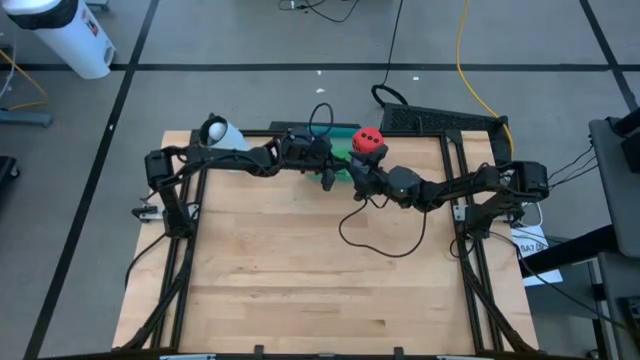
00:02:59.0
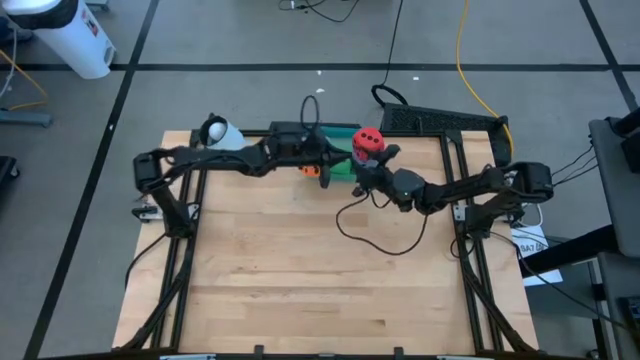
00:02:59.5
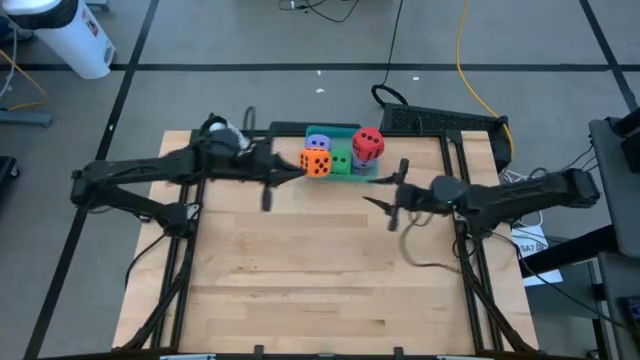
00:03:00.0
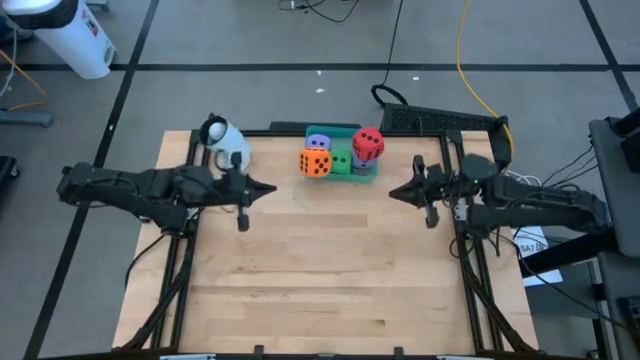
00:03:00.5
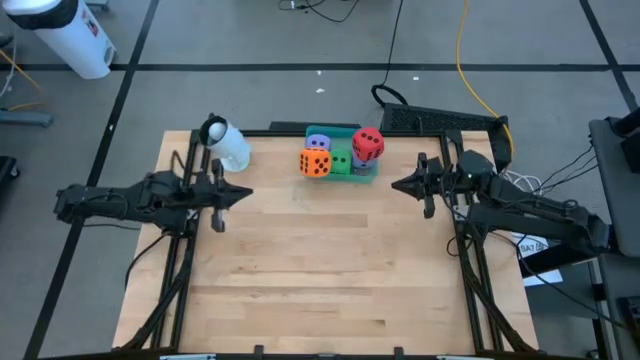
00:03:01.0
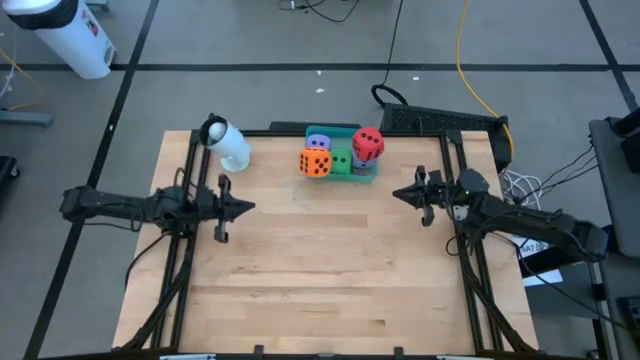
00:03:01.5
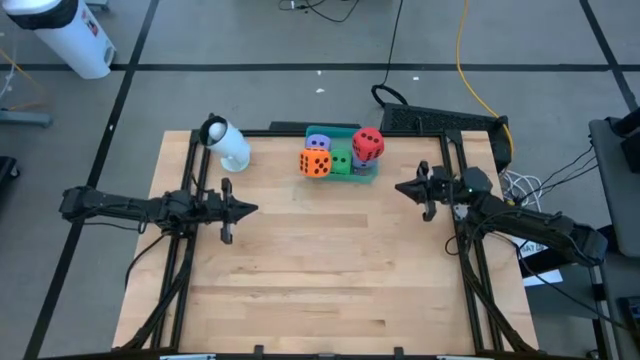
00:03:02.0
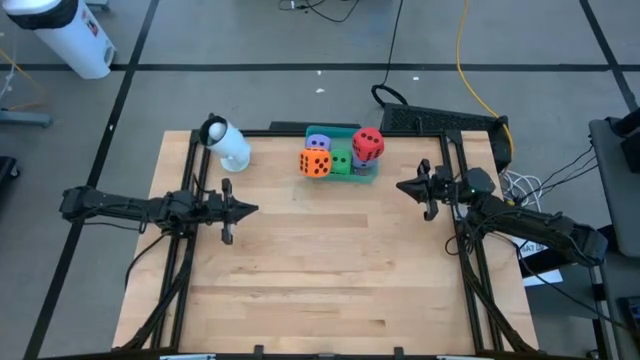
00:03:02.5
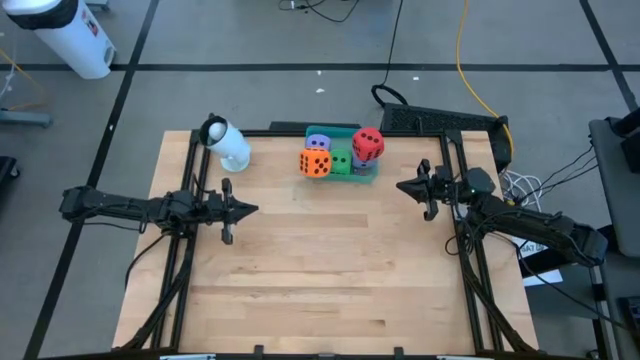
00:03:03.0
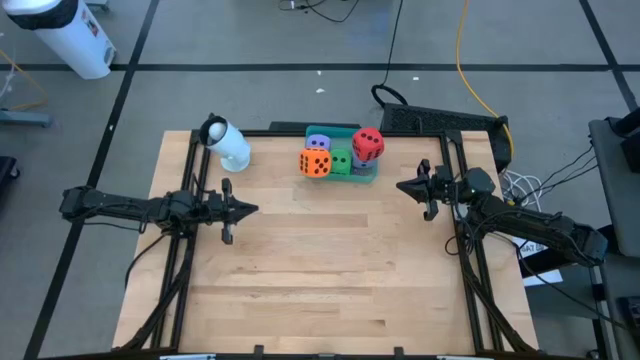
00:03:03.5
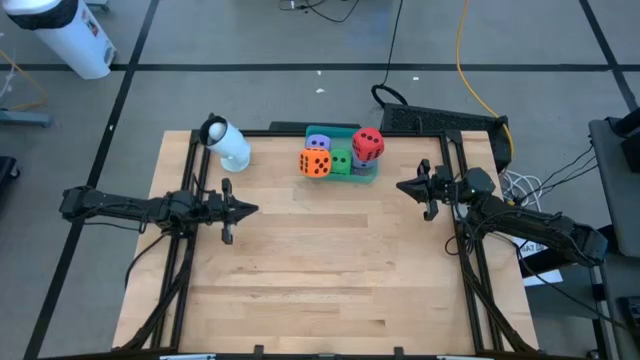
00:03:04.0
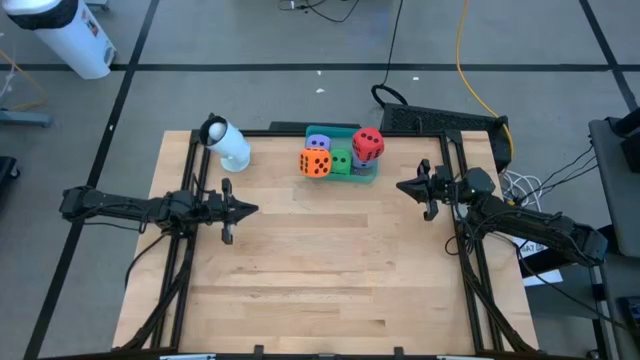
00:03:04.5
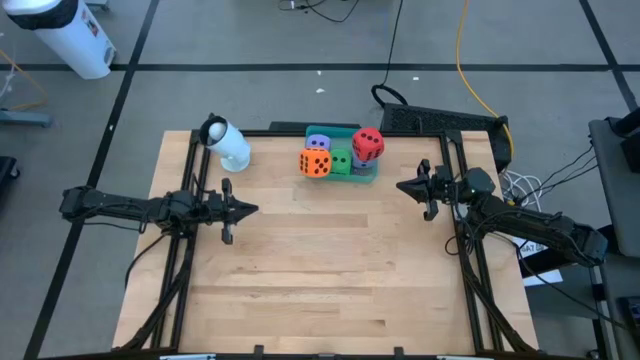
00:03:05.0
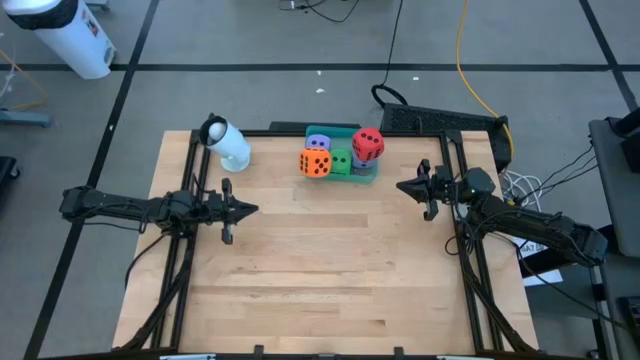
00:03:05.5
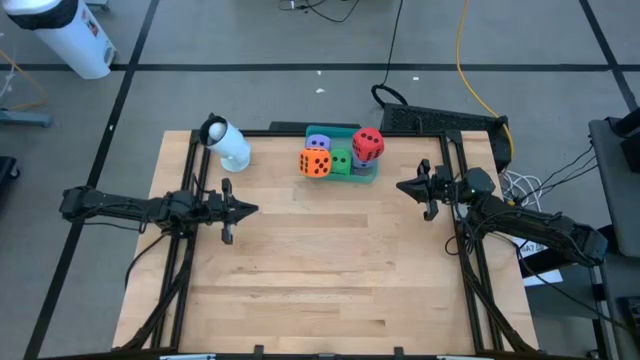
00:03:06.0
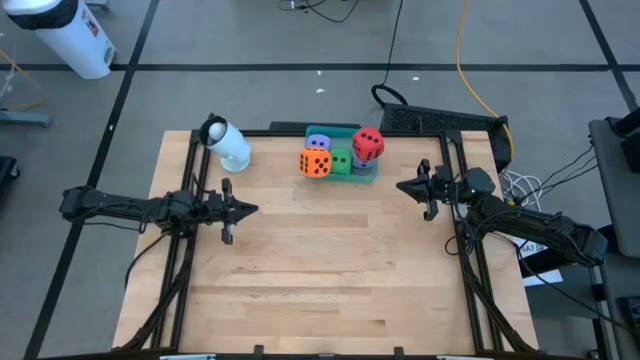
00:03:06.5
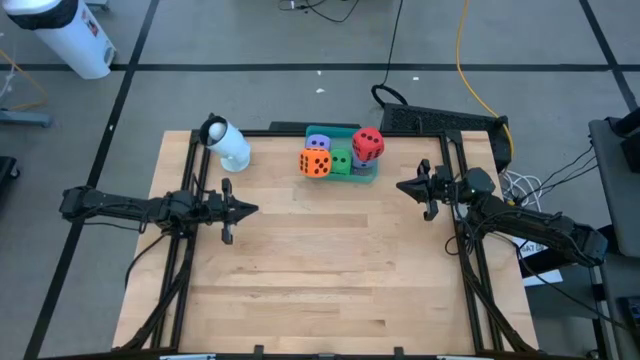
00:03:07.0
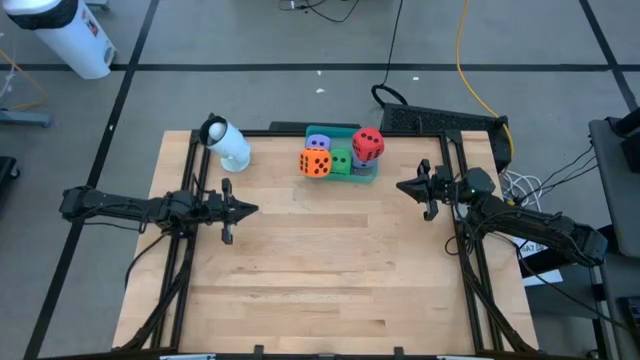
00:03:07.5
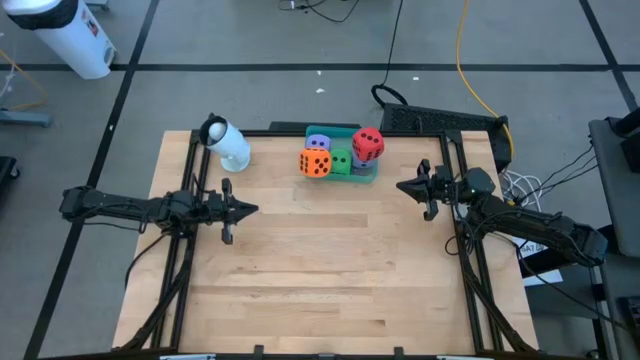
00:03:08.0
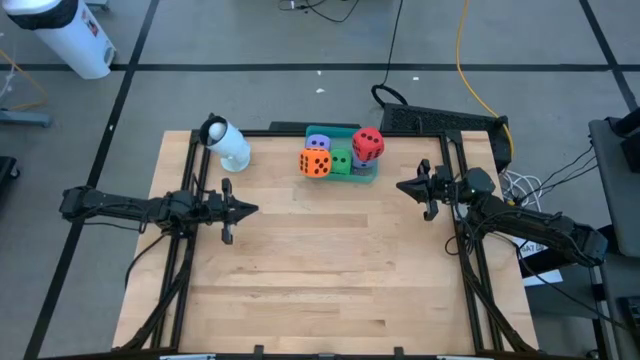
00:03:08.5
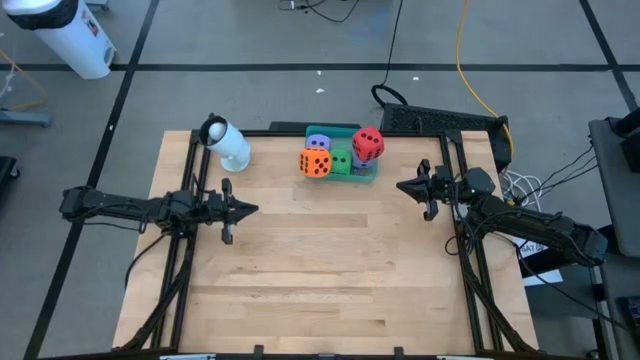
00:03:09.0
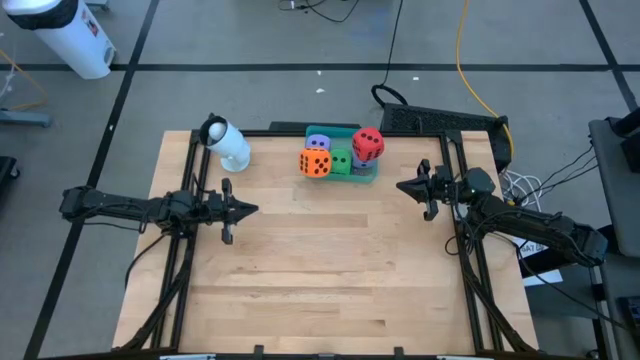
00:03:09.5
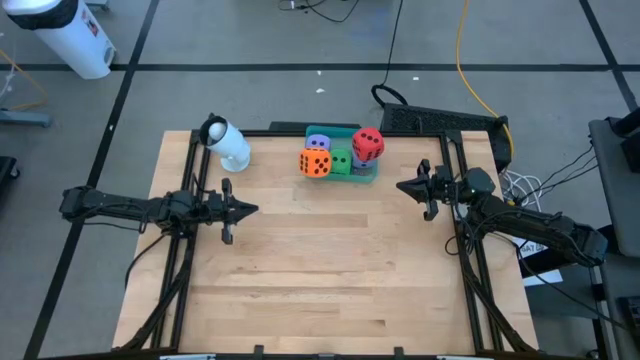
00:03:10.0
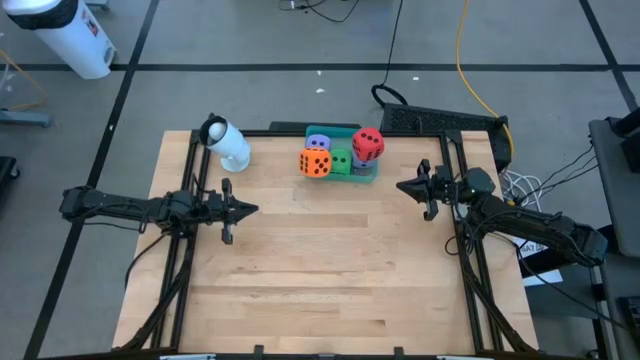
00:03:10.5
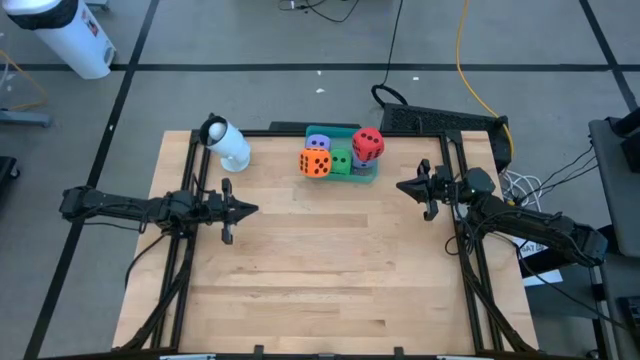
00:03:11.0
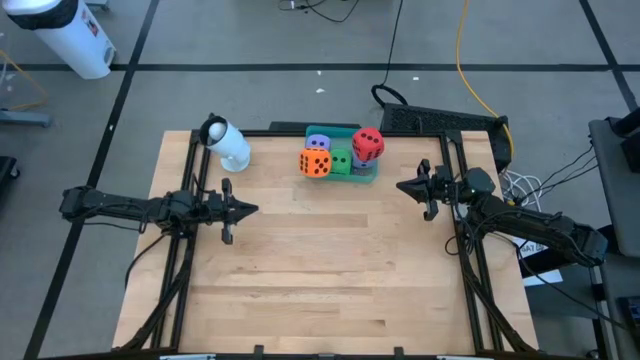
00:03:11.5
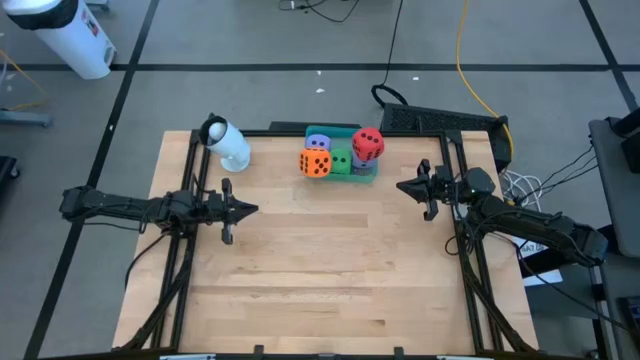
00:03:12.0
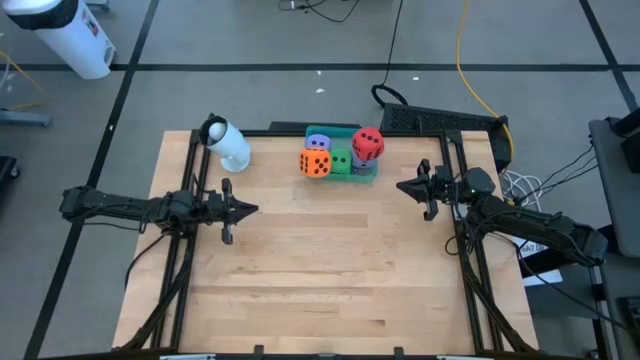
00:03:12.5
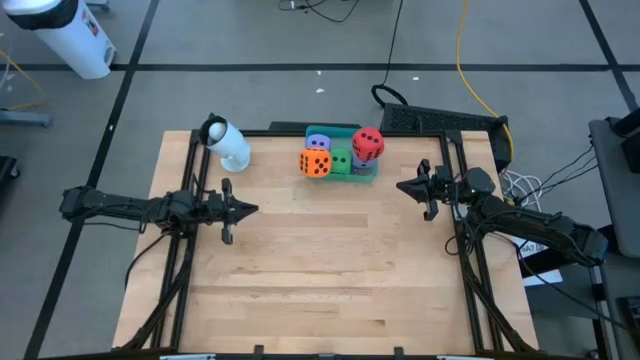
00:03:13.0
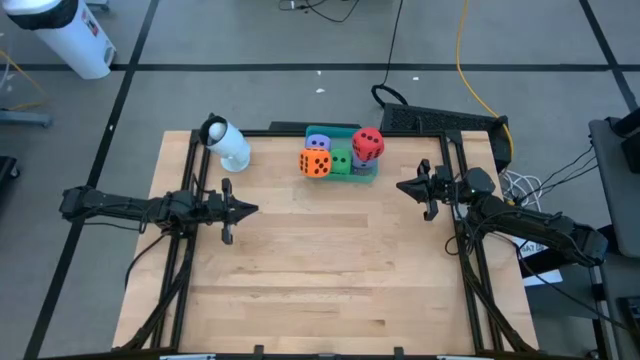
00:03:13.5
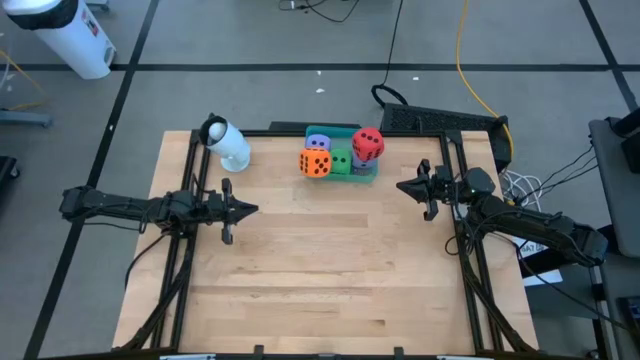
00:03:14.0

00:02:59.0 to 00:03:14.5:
Task: Pick & Place Dice
Return to Home Position

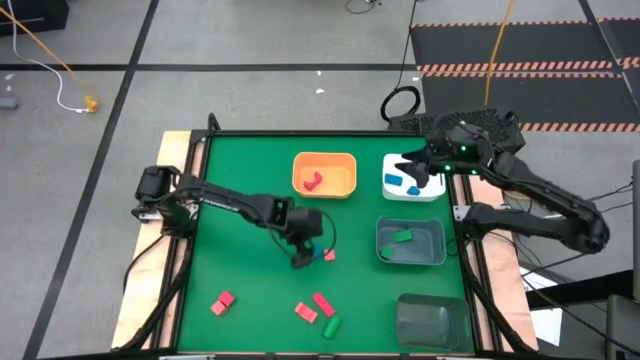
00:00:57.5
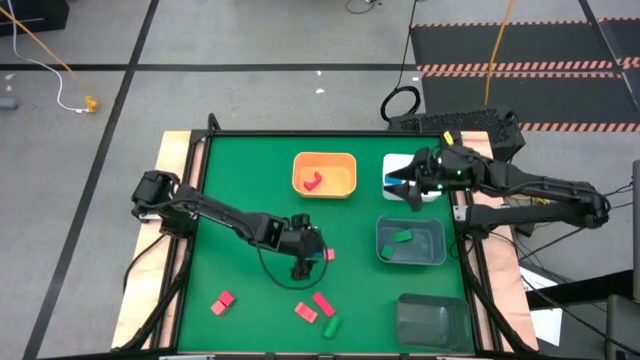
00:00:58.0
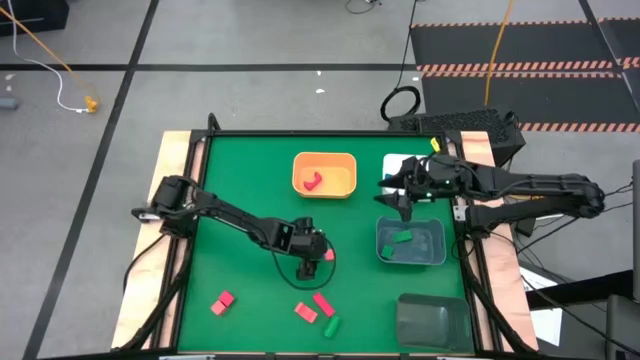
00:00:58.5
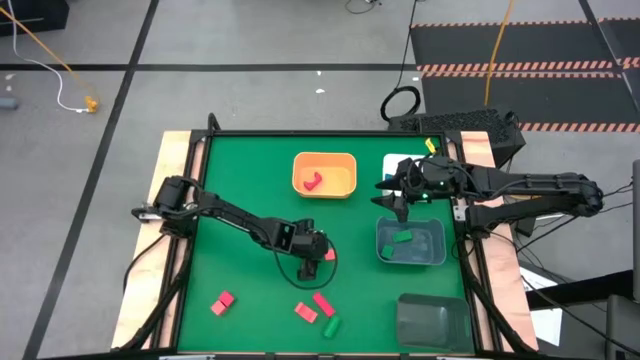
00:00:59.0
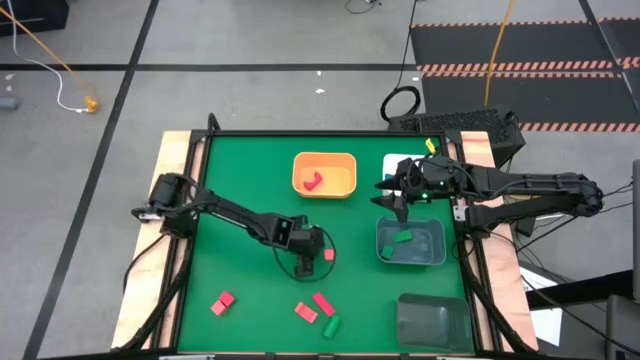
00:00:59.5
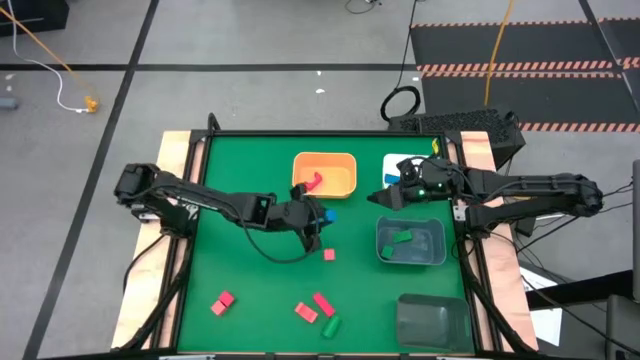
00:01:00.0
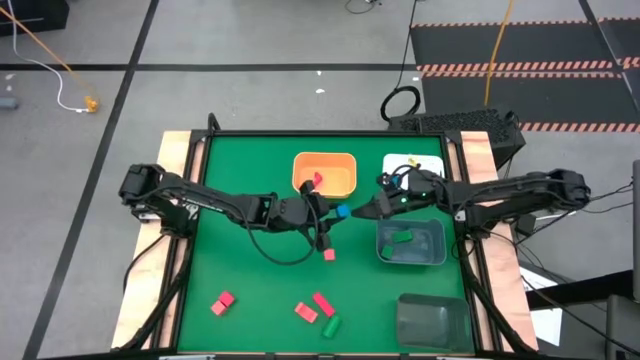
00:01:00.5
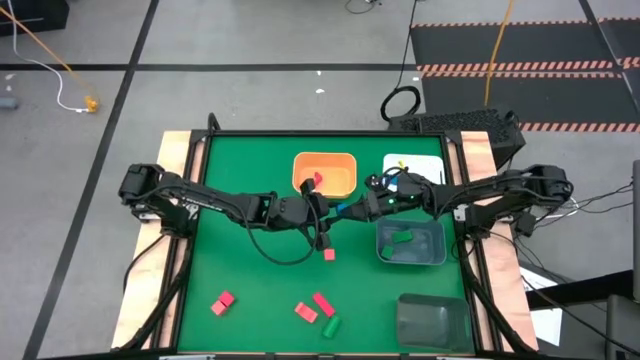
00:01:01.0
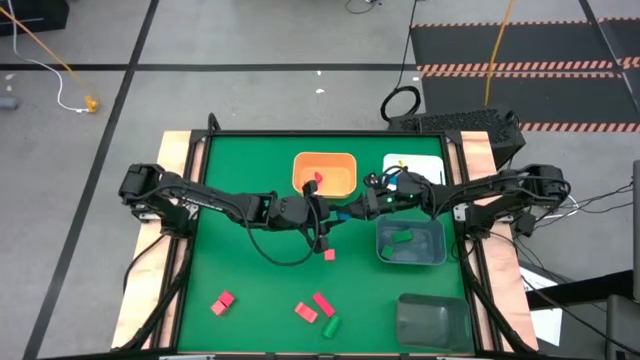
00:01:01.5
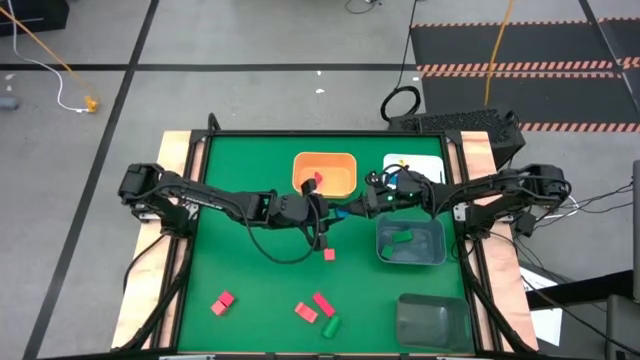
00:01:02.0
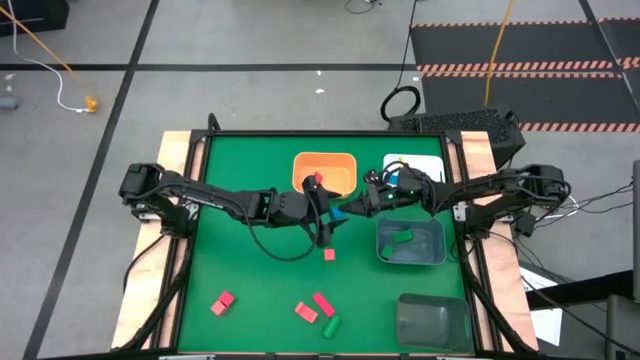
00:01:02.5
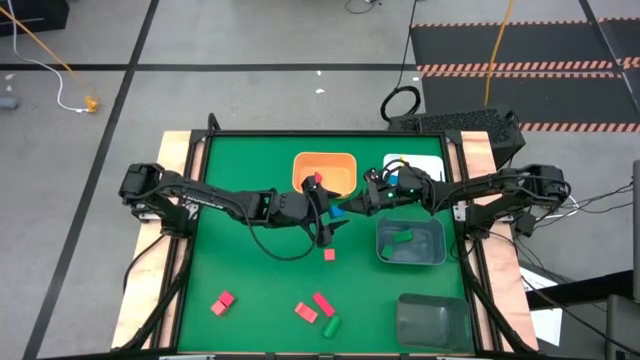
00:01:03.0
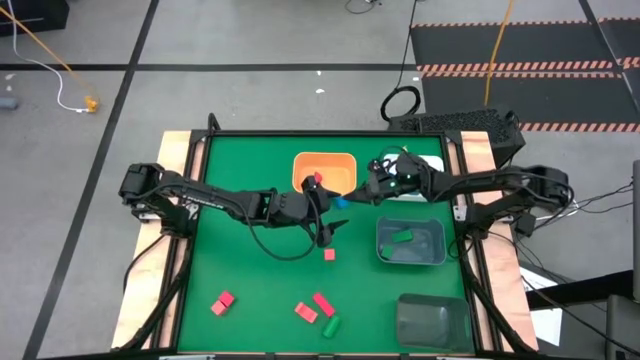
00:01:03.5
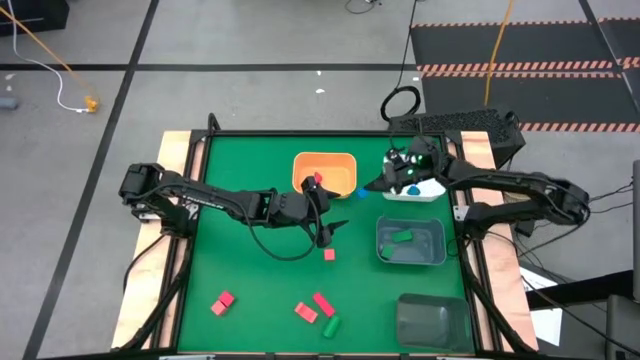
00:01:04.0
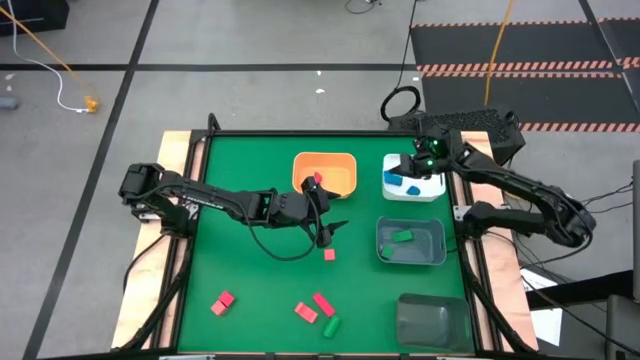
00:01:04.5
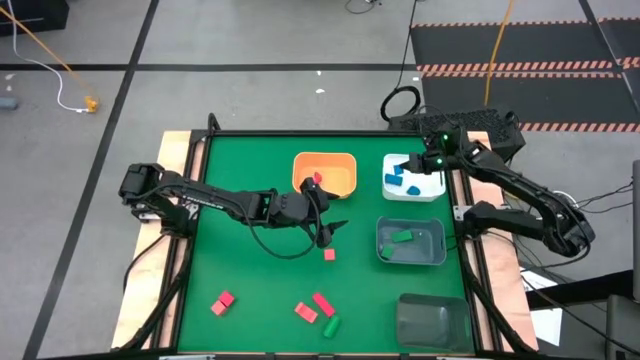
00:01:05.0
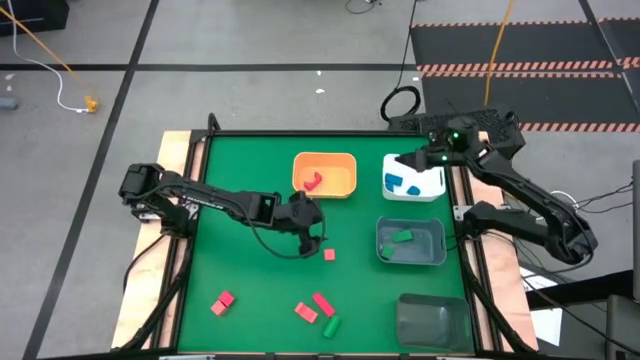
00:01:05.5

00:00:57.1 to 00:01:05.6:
Task: Sort & place blocks by color
Put the blue block into the white bin
